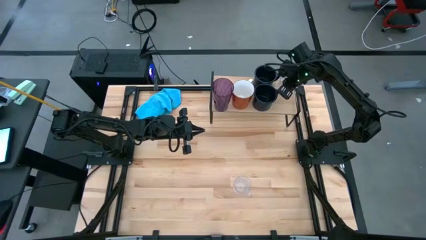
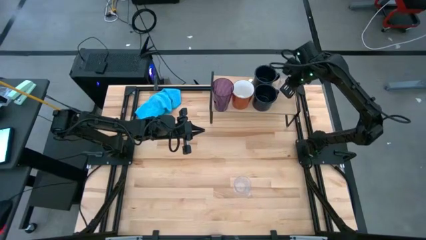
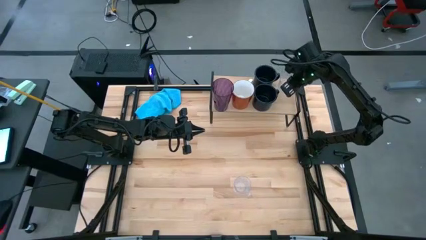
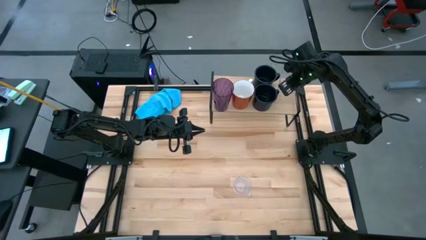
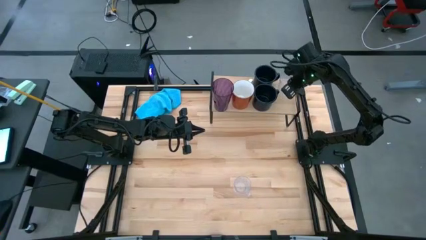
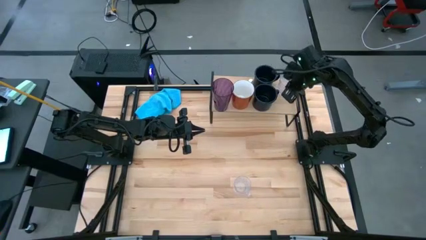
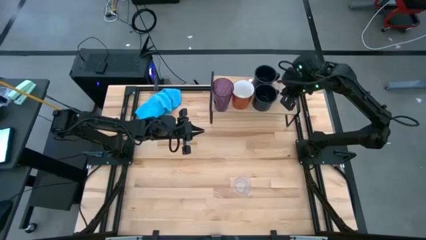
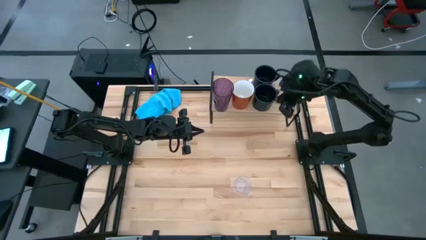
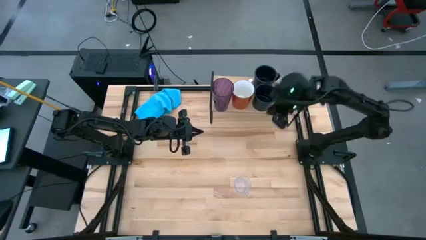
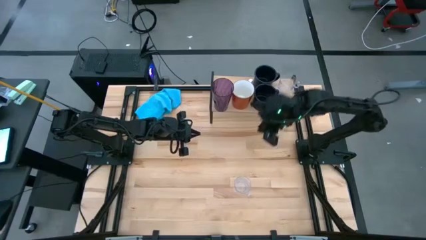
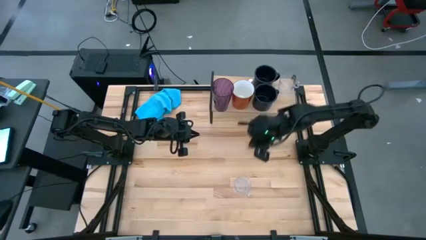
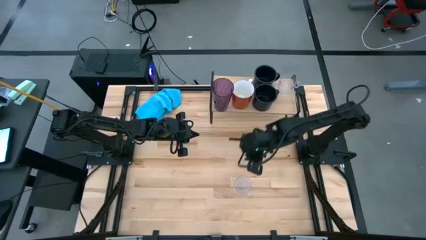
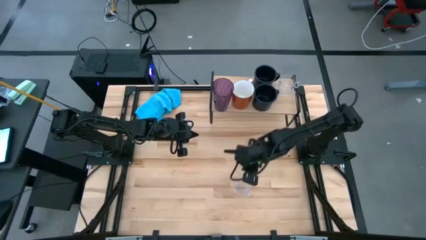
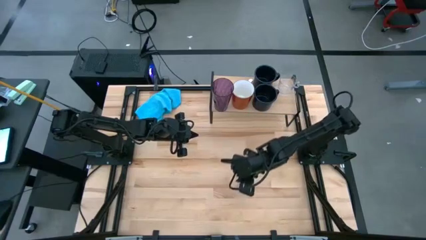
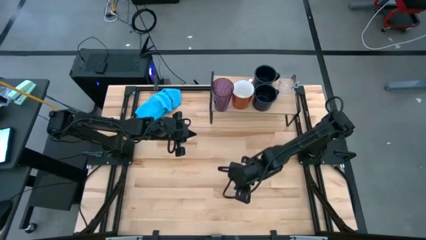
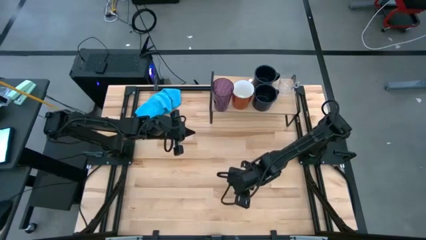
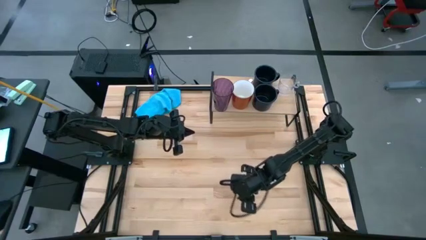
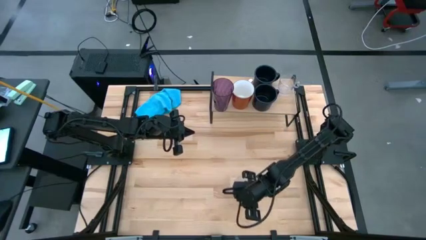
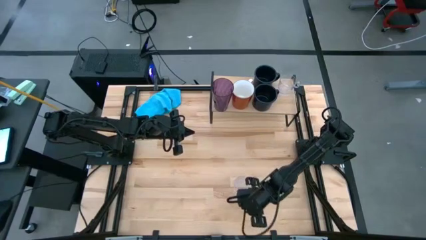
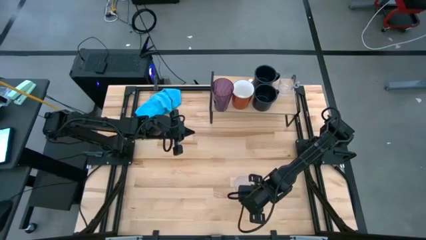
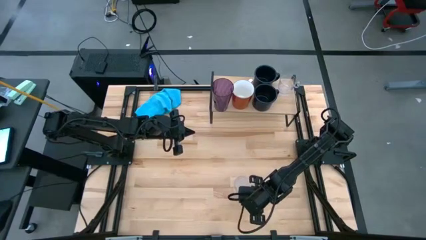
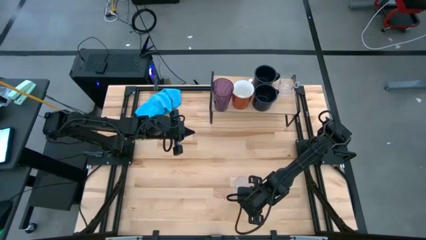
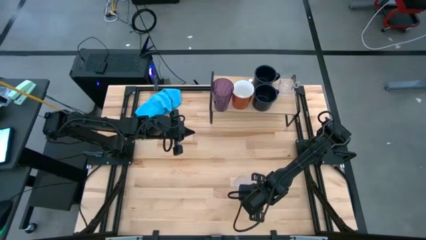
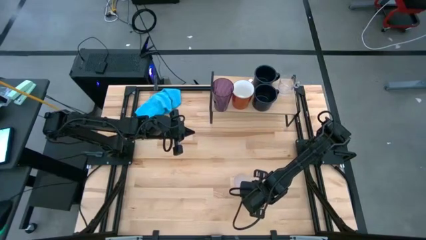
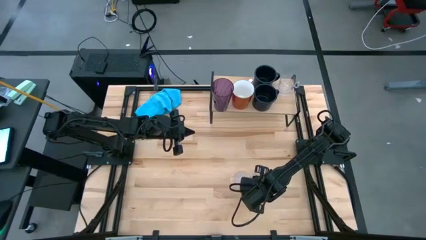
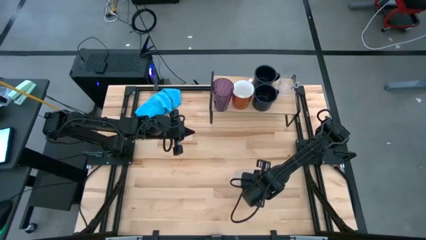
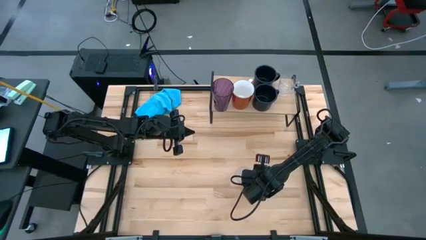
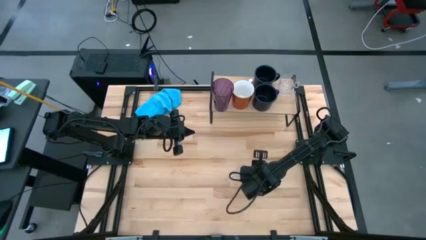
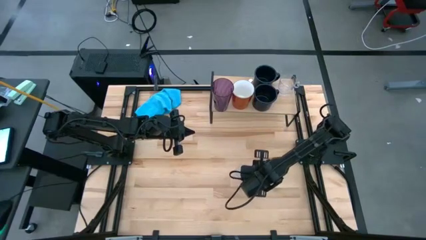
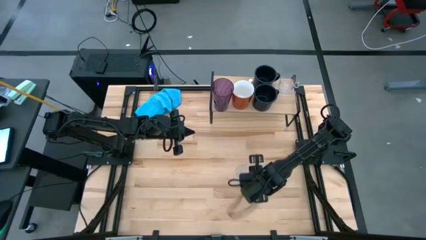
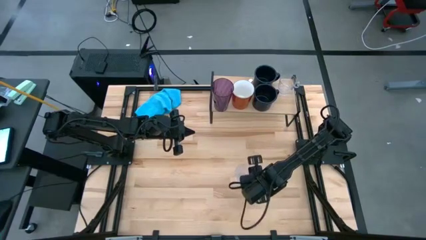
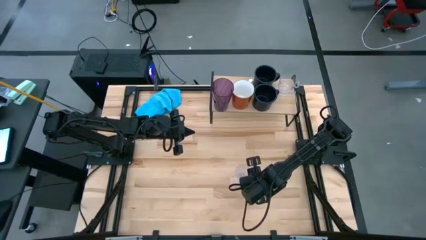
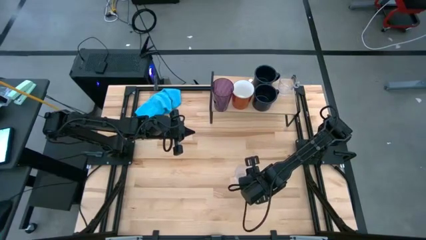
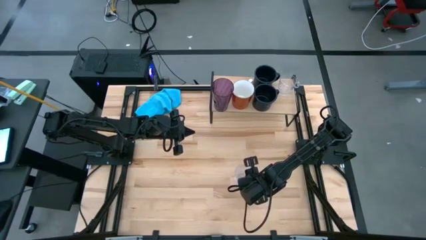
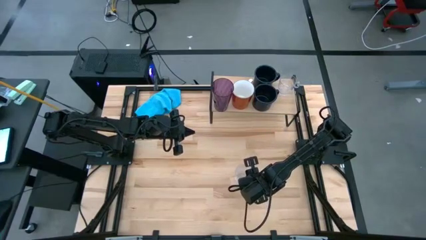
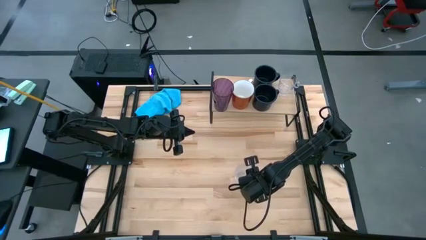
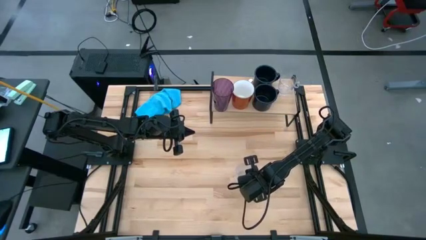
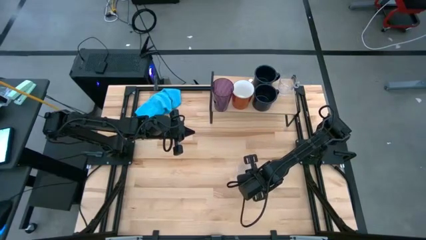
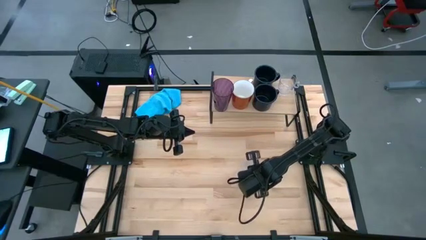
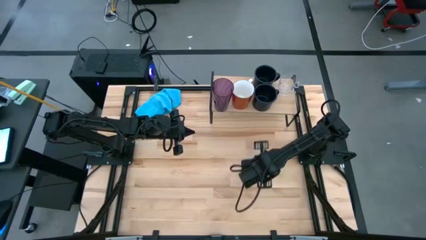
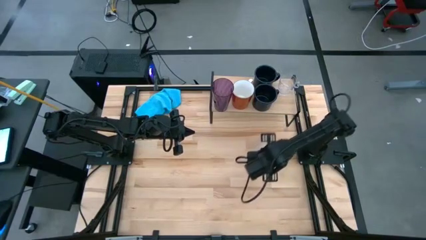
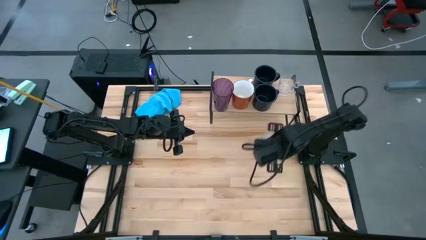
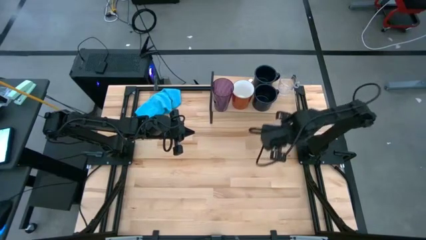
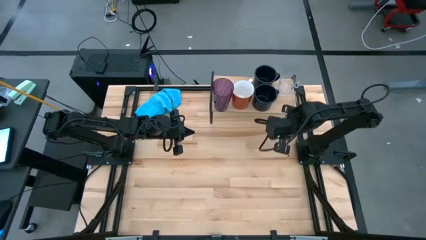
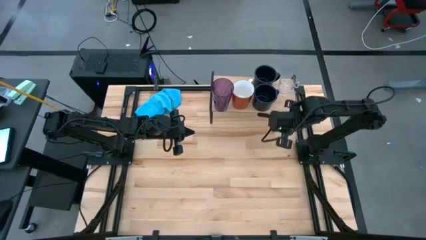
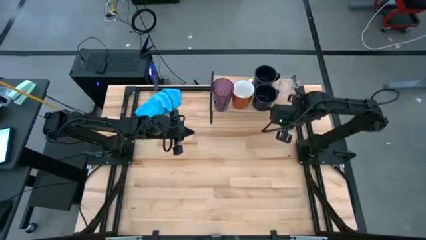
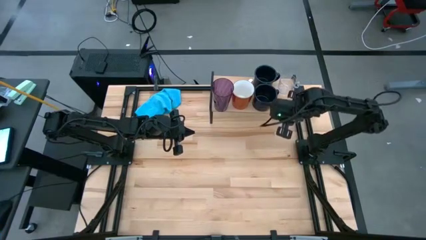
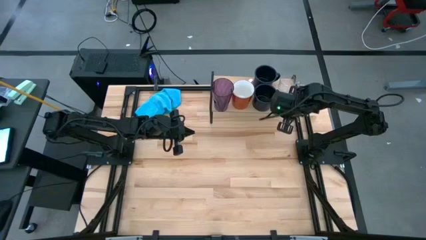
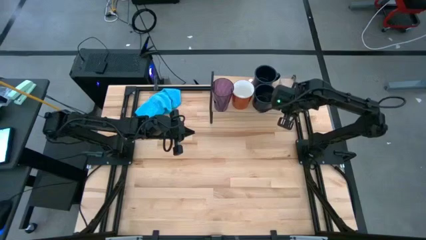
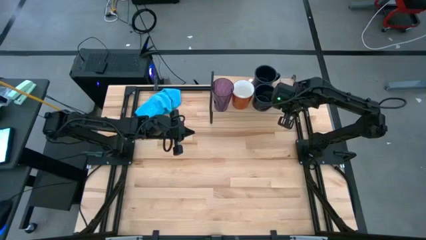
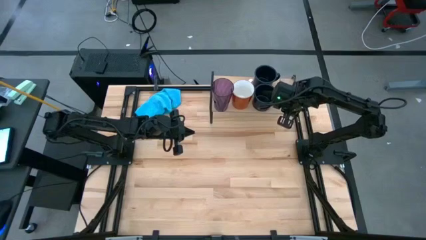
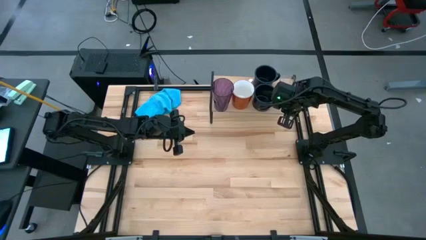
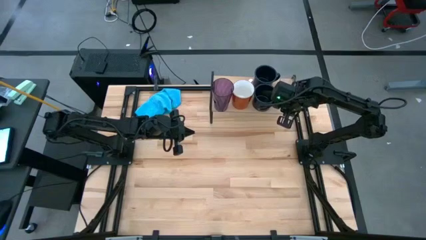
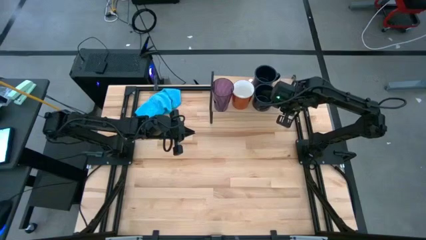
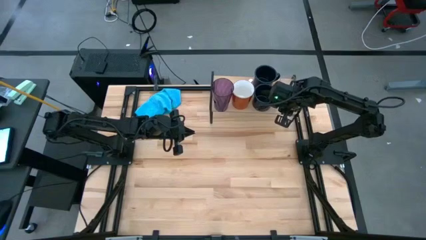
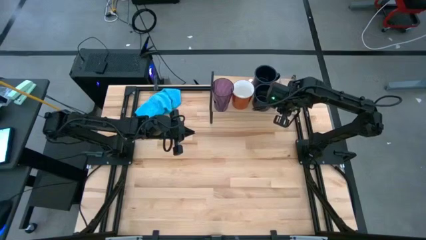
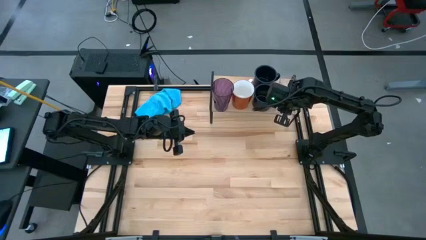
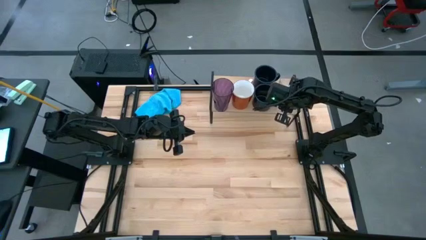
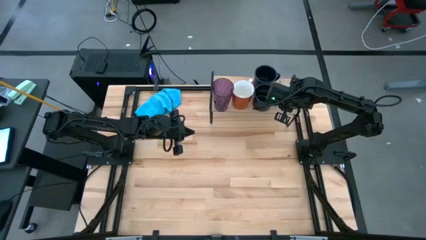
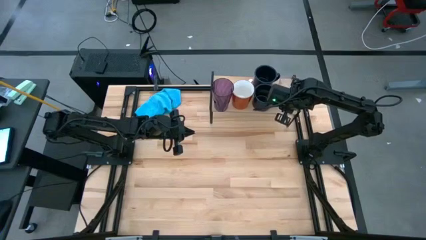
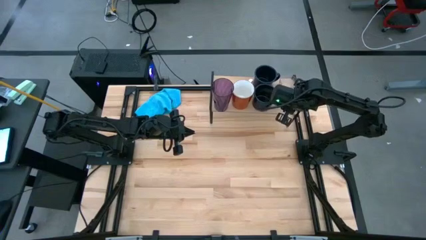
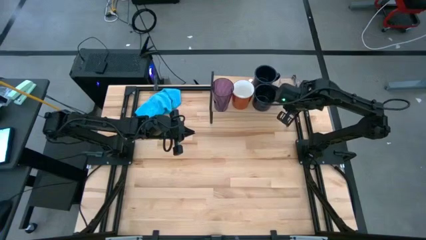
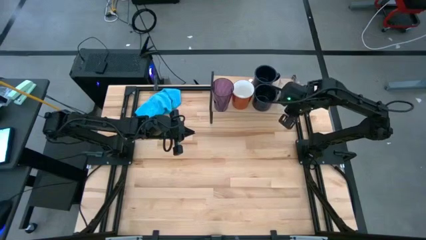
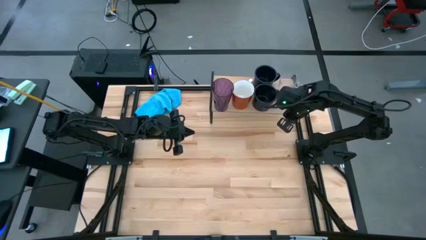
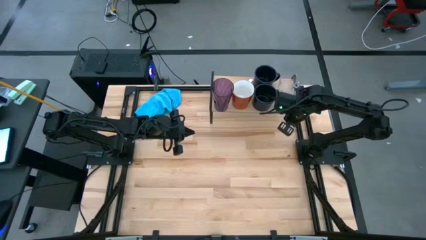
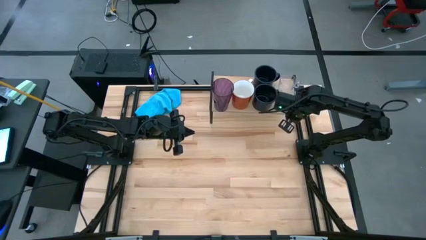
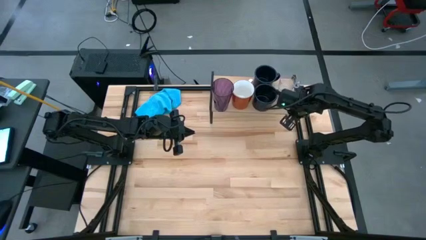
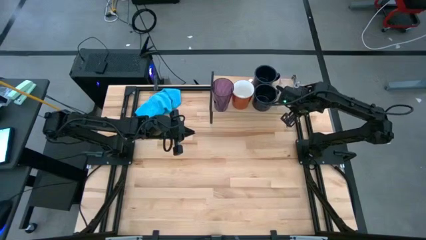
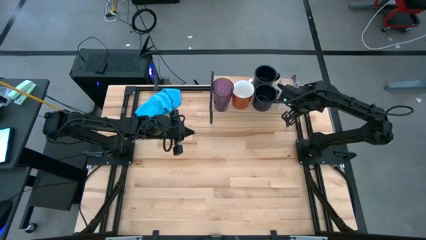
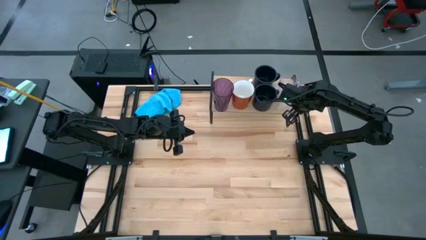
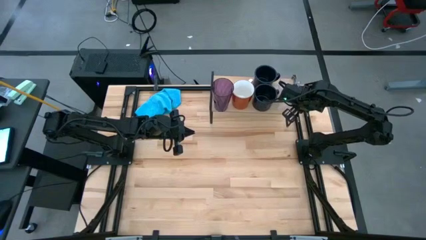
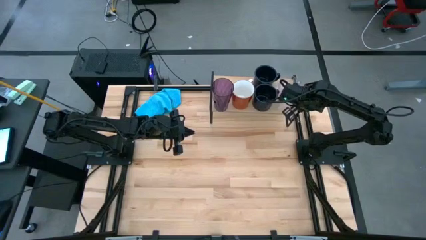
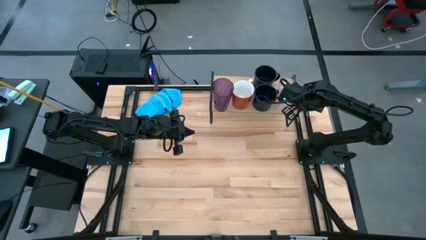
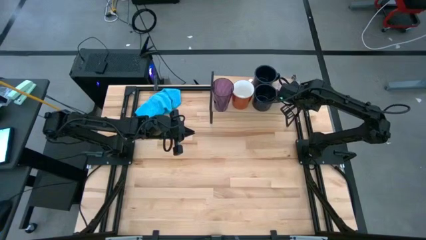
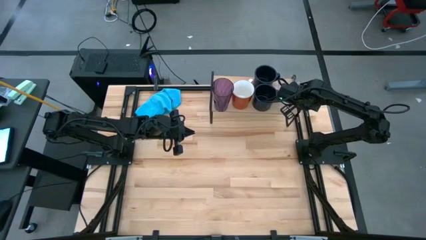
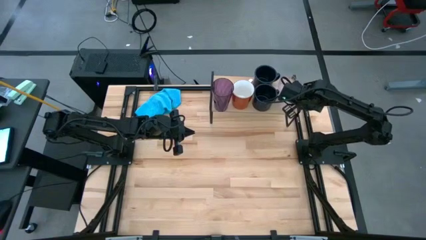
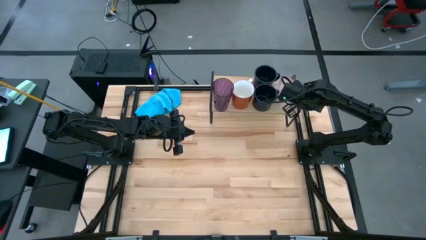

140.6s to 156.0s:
Task: Stack small to large cups/mugs on shelf
Put the transparent mug on the shelf aligned with the other transparent mug
